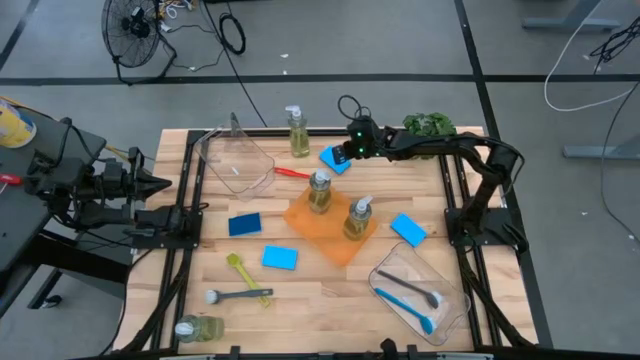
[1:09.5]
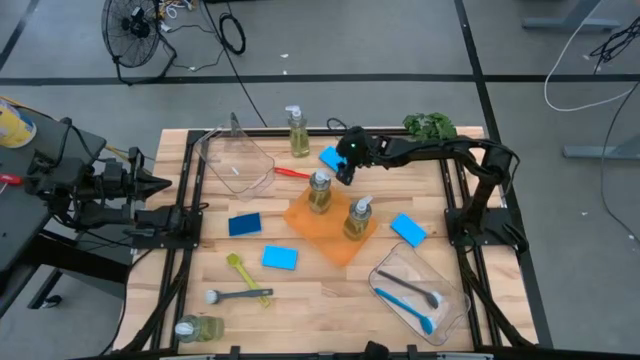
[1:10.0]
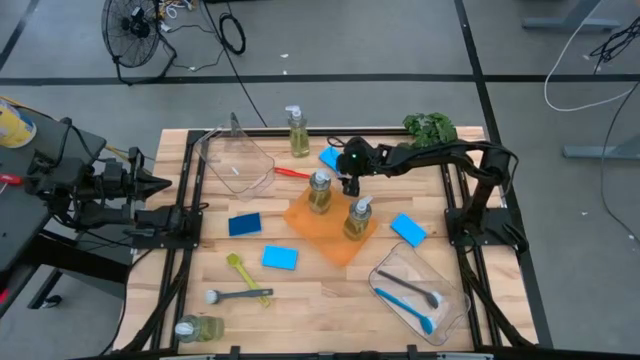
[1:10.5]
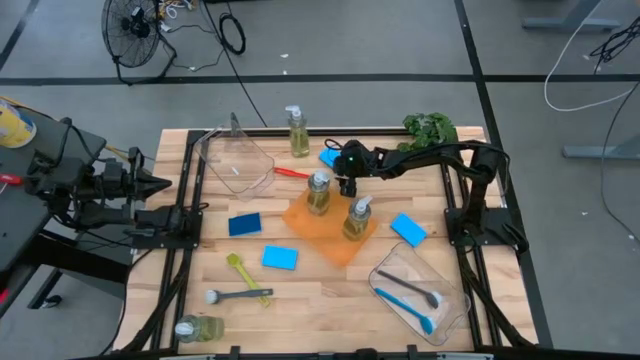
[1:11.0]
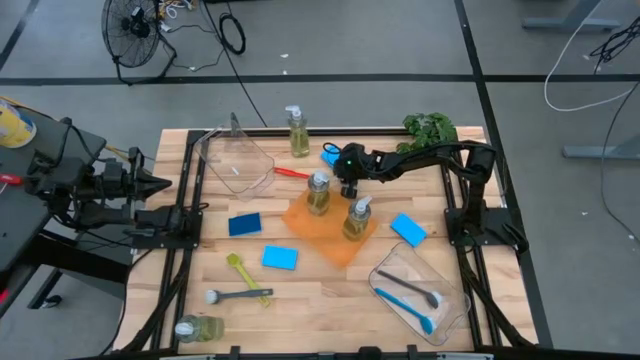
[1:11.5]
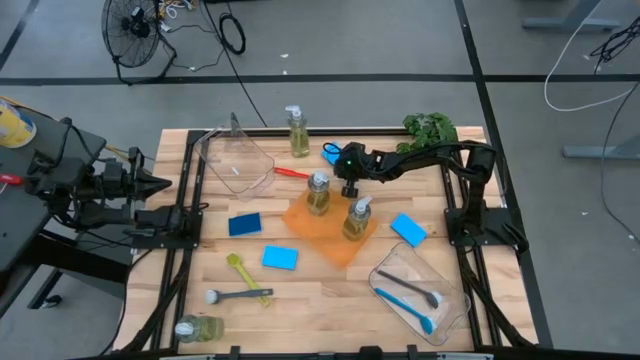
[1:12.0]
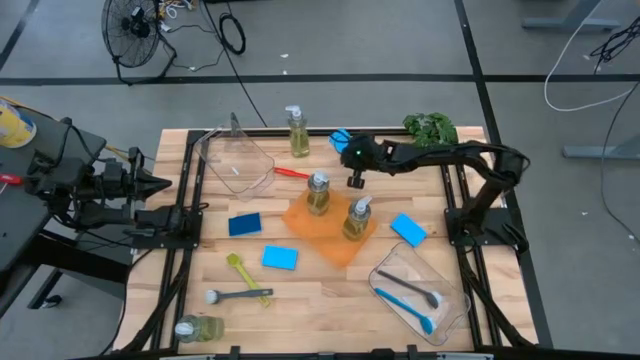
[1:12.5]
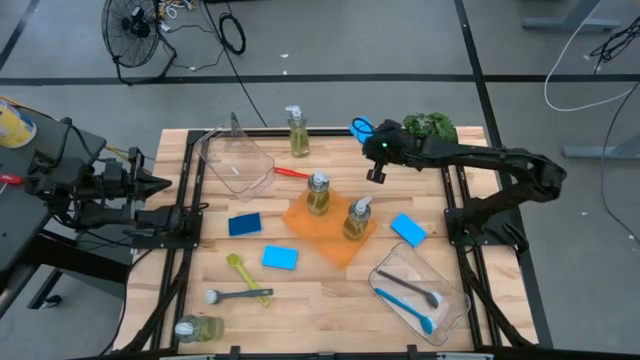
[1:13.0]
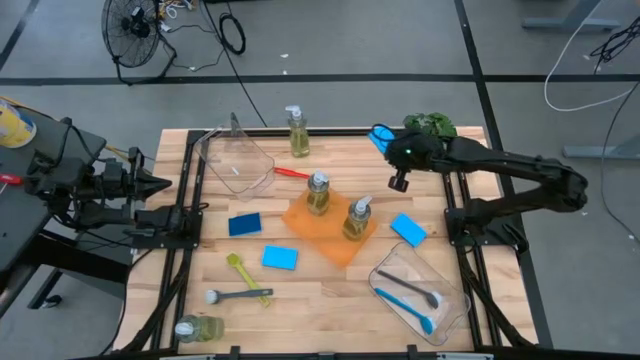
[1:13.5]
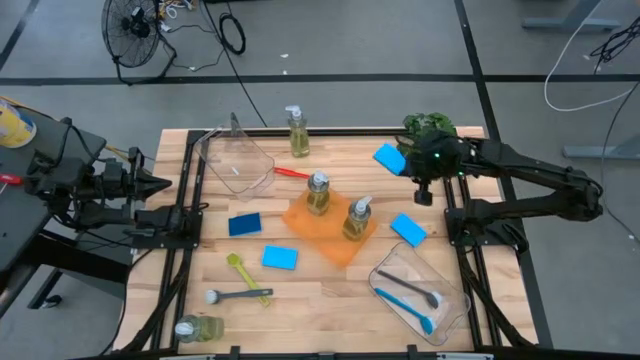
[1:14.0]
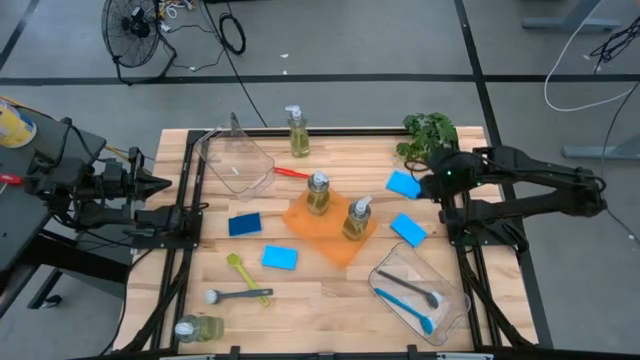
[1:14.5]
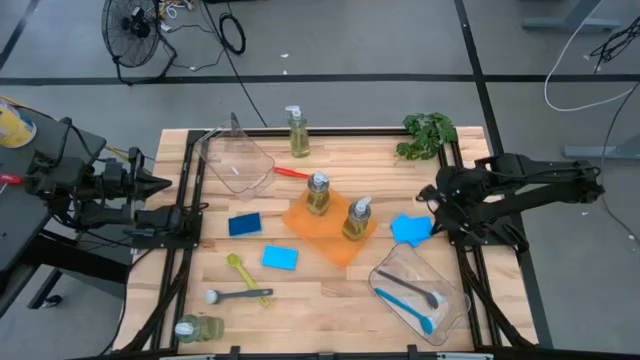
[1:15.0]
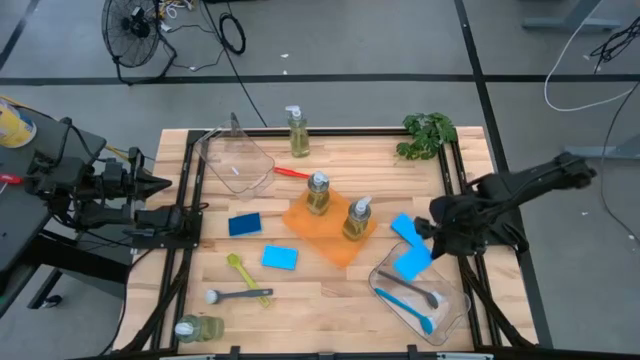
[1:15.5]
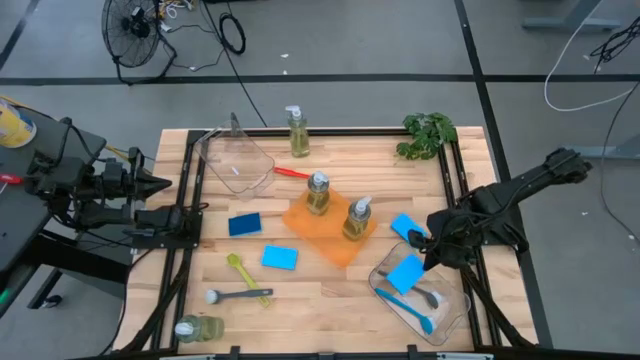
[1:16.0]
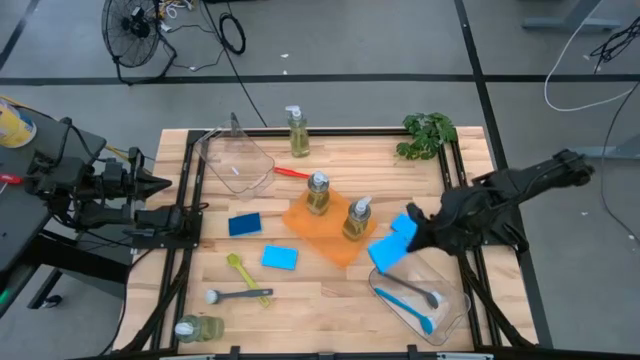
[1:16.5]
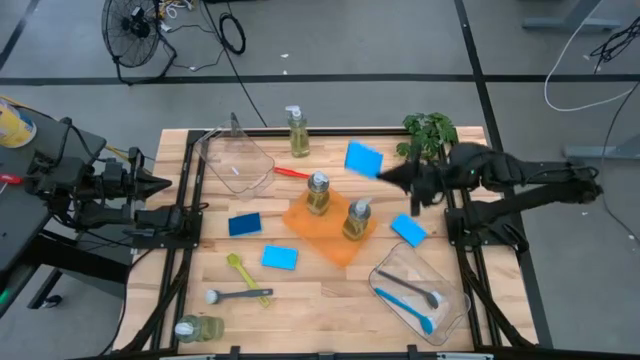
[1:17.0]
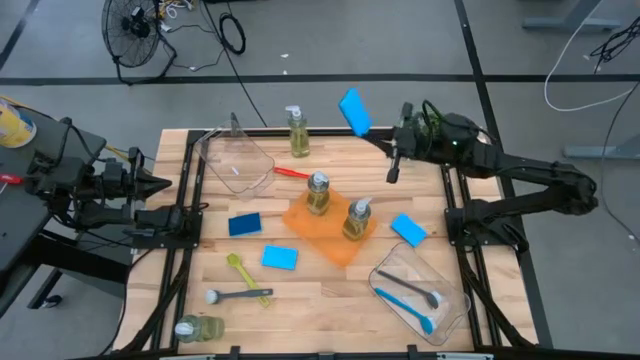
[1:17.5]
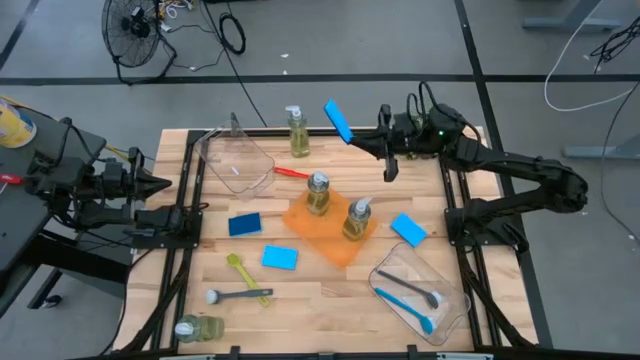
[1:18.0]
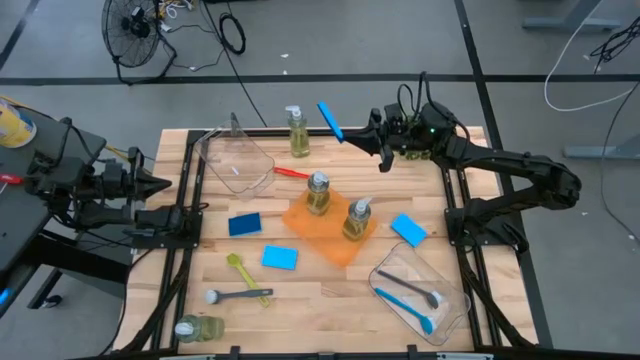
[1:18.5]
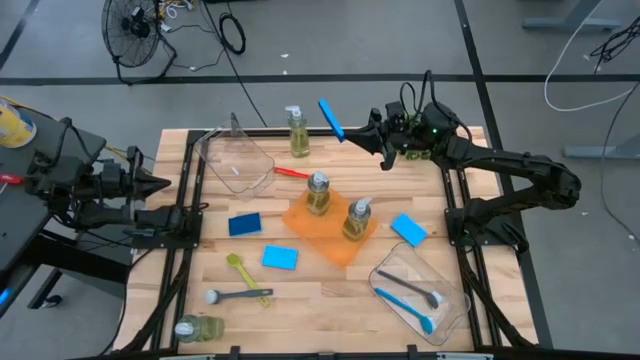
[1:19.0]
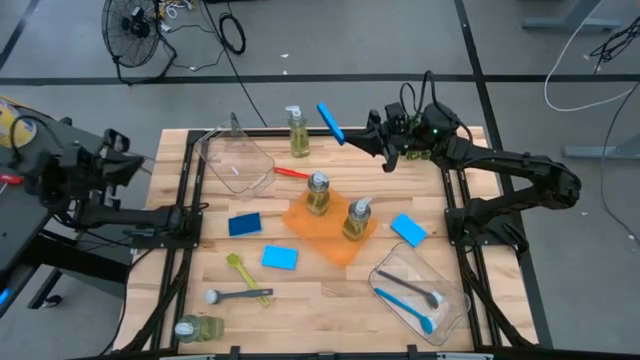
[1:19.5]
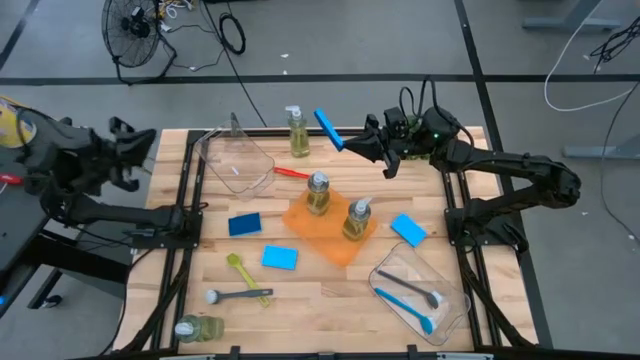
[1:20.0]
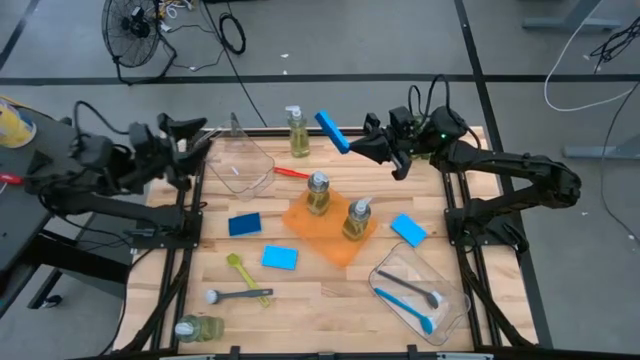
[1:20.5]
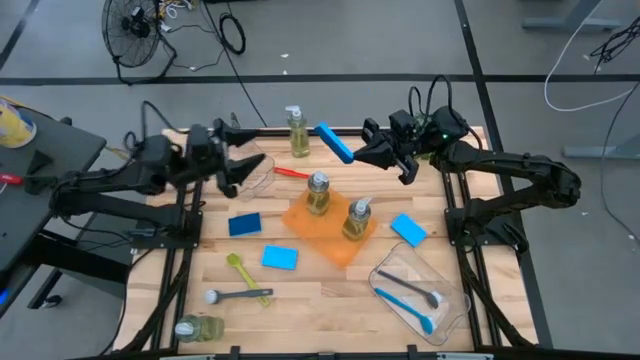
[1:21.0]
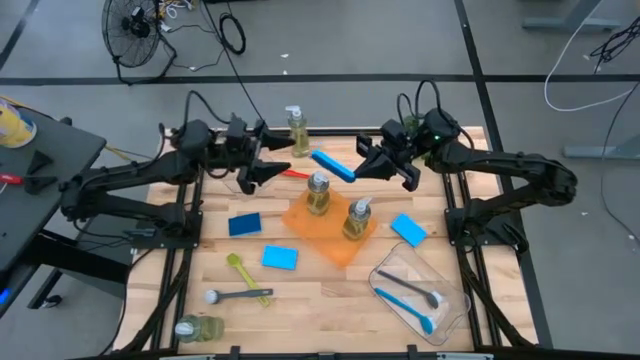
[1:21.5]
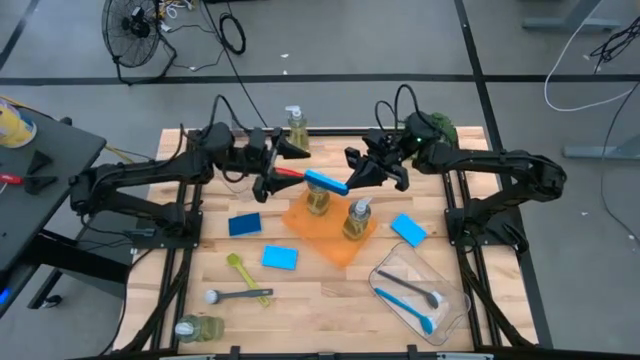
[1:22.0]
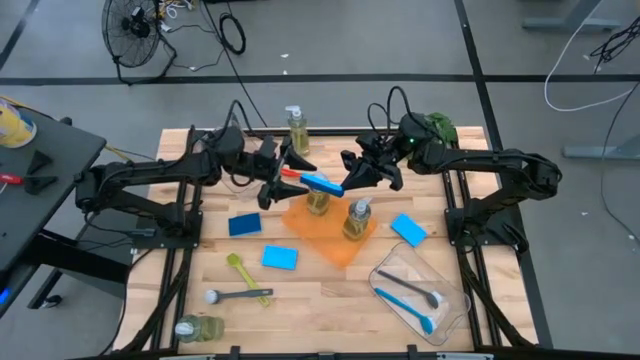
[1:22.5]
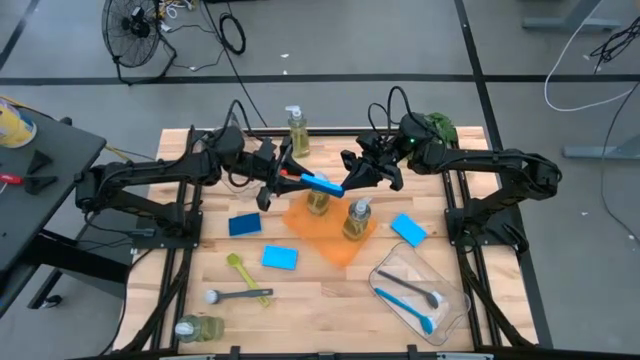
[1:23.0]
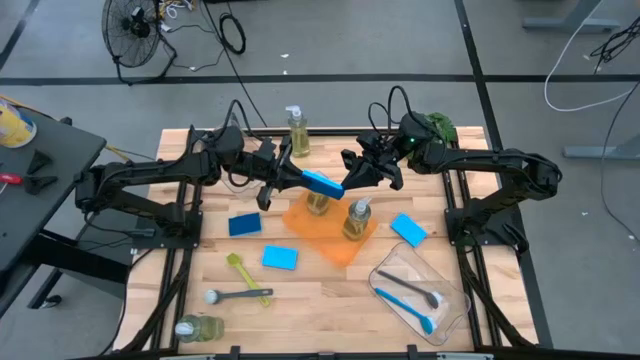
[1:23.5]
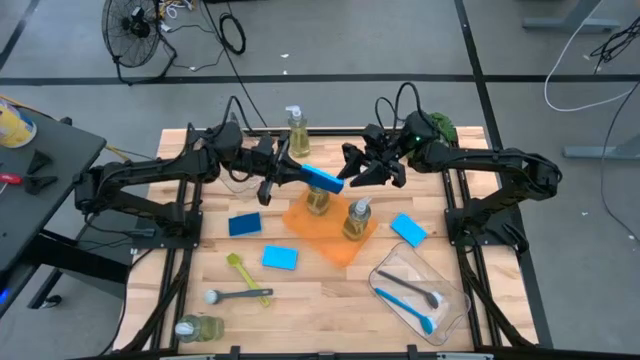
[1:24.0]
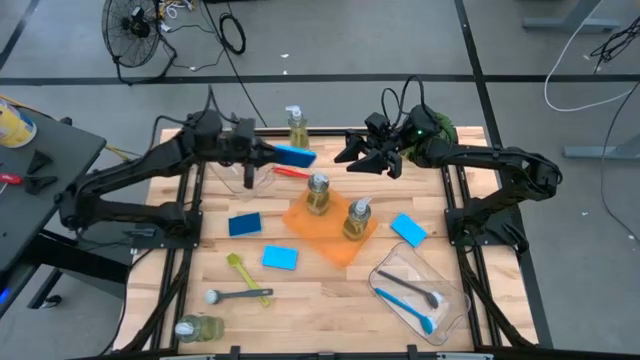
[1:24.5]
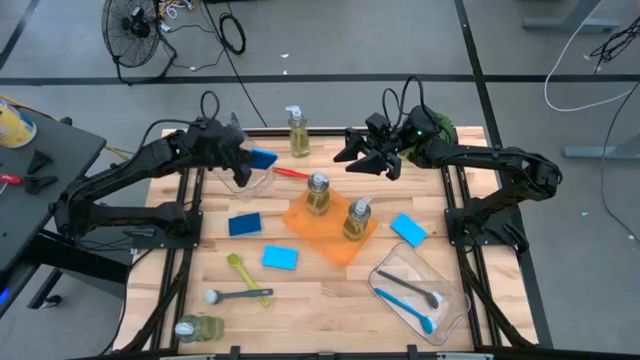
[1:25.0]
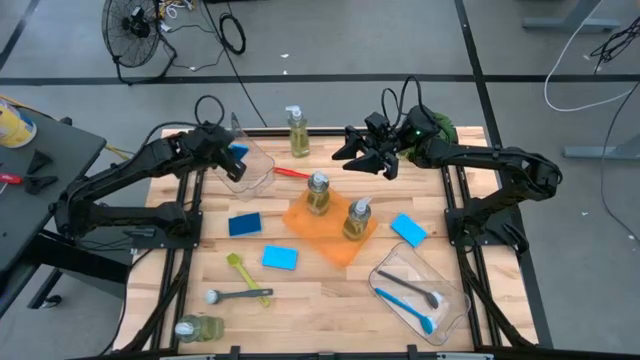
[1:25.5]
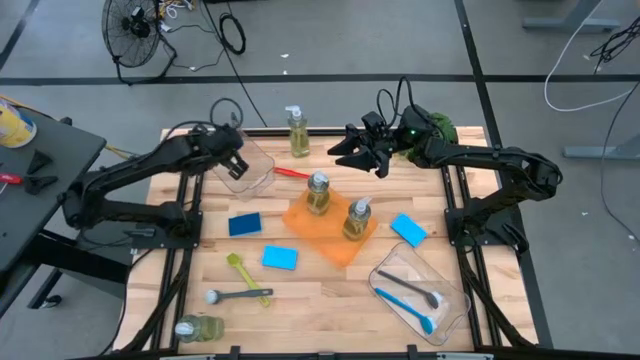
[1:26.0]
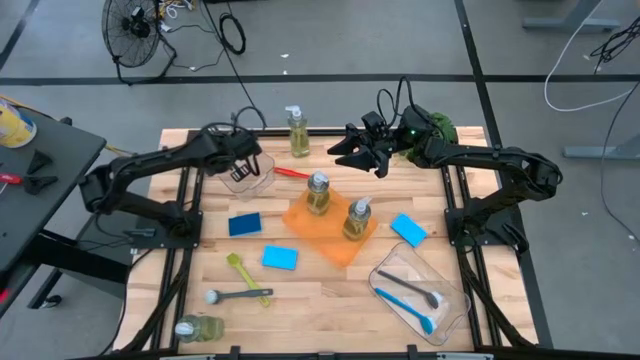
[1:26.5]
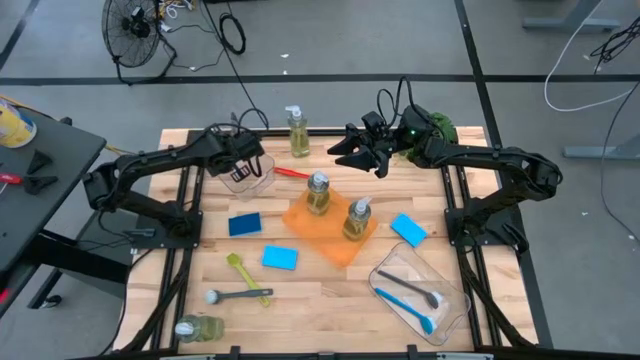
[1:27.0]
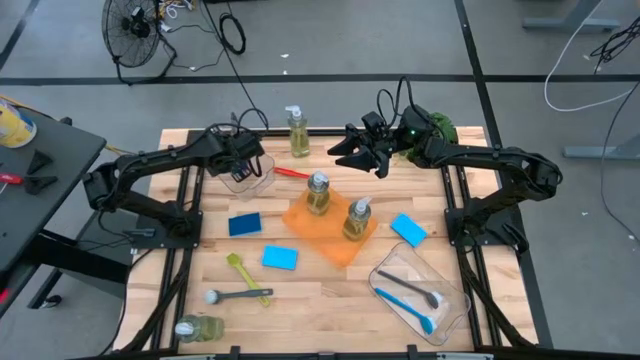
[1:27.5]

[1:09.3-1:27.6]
Task: Pick & Place Kitchen Sink Supplies
Put the blue sponge into the top transparent bin

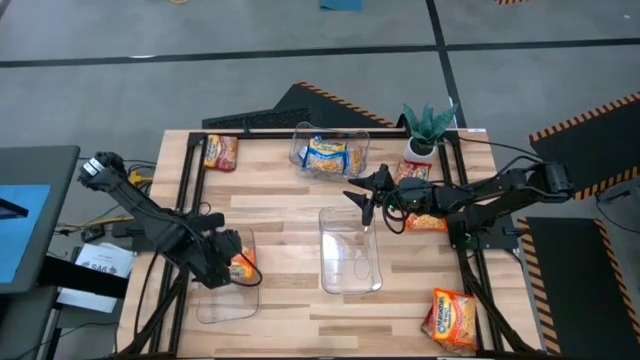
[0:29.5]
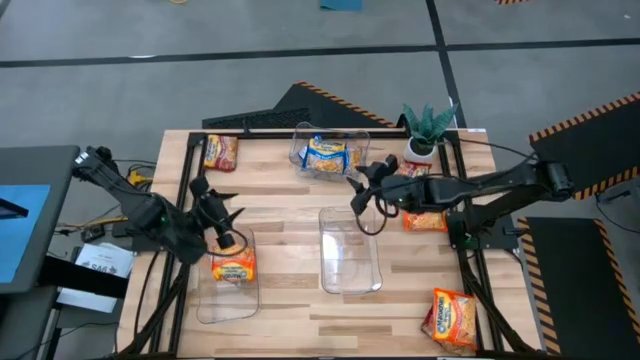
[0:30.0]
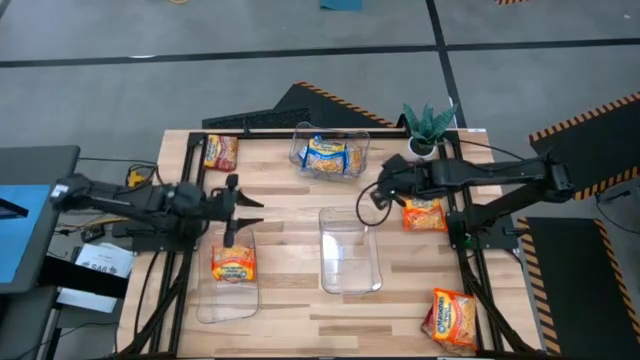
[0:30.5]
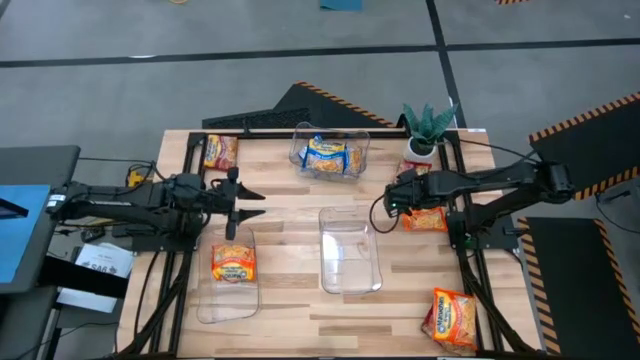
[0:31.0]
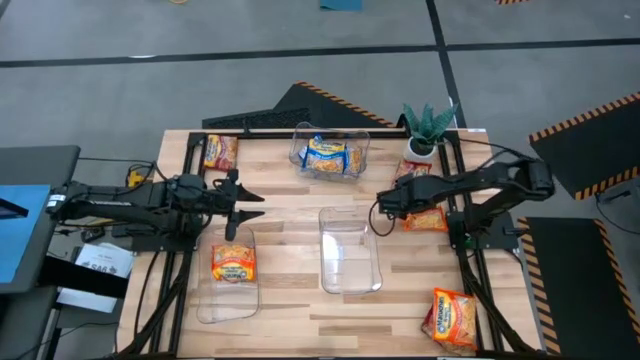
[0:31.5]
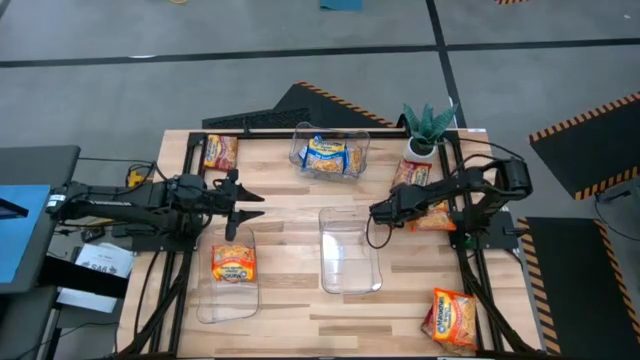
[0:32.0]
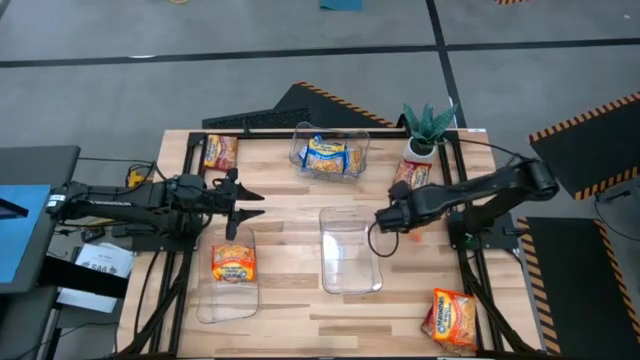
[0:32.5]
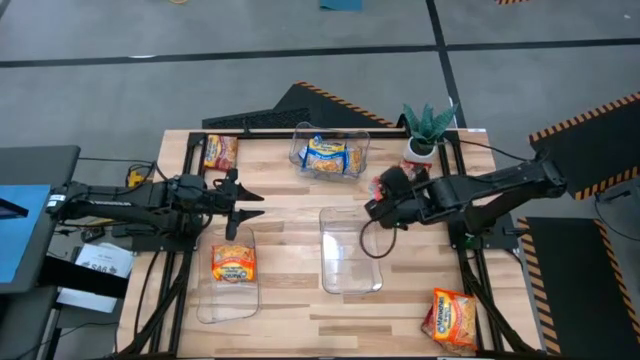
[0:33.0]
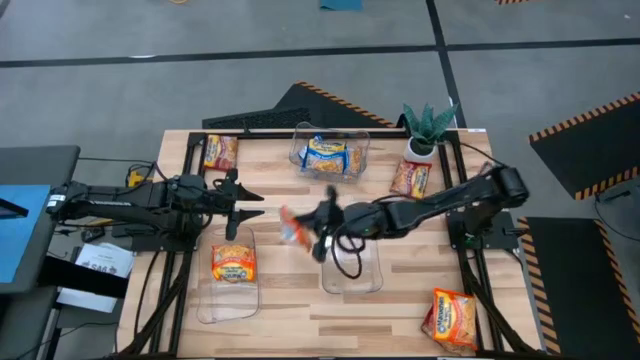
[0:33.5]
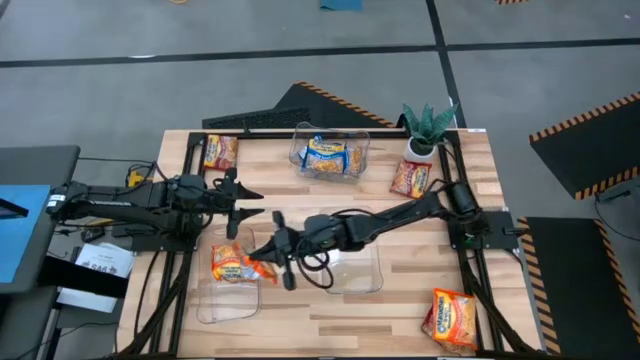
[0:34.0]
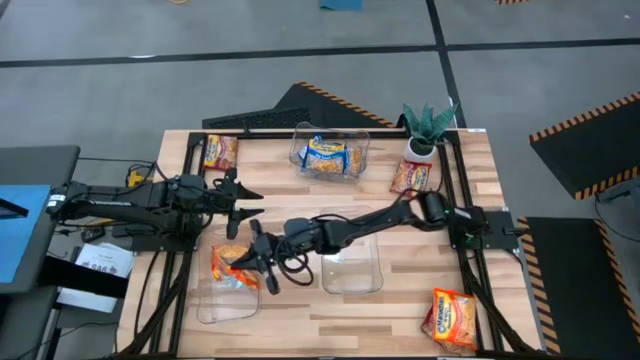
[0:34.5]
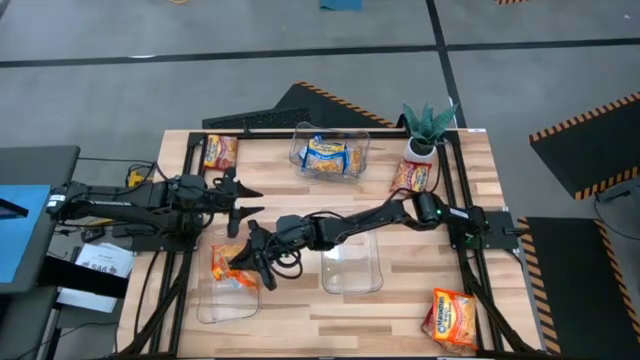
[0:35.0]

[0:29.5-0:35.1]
Task: Sort Maruchan noodles
Put the top orange noodle pack into the bottom left transparent bin
